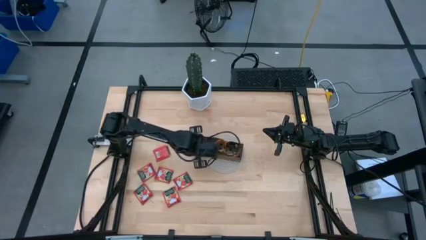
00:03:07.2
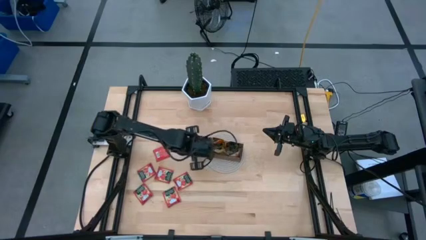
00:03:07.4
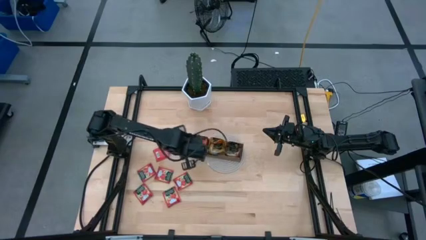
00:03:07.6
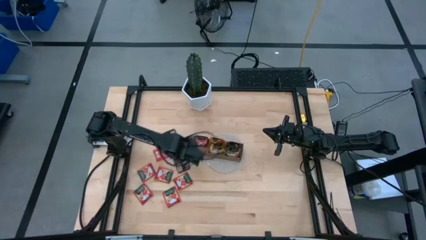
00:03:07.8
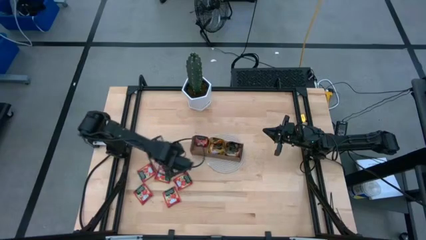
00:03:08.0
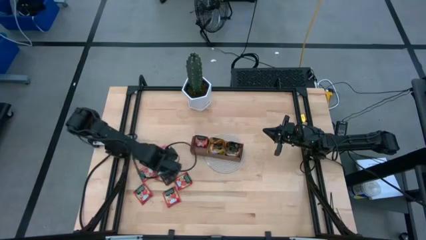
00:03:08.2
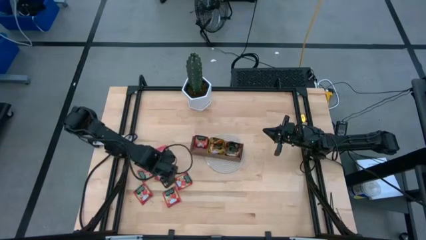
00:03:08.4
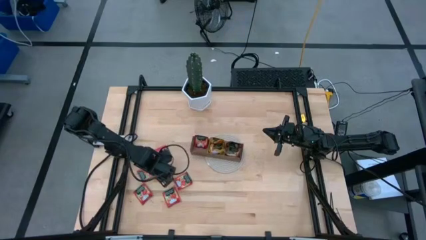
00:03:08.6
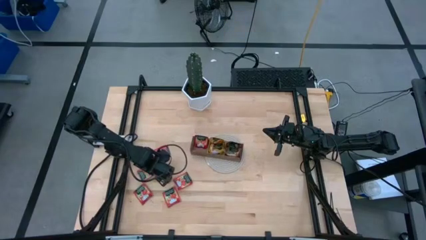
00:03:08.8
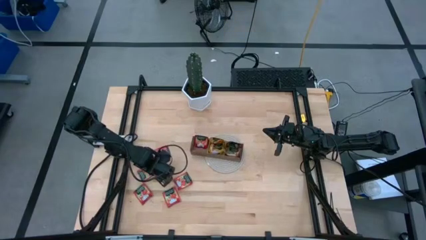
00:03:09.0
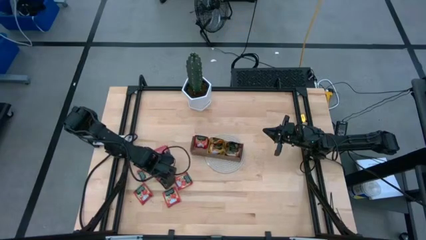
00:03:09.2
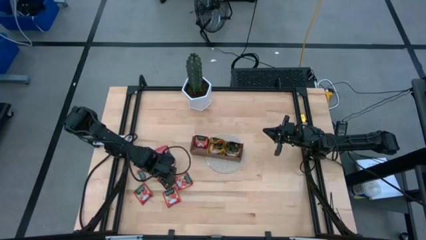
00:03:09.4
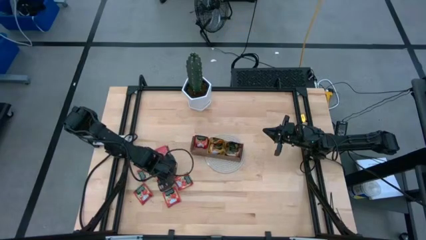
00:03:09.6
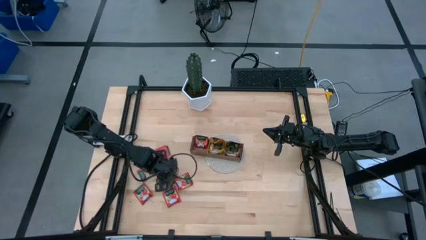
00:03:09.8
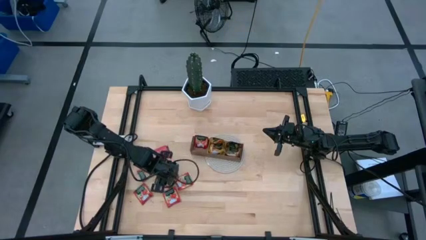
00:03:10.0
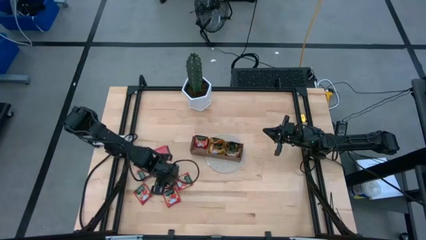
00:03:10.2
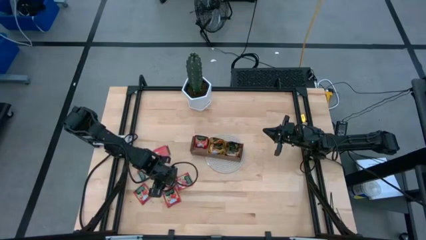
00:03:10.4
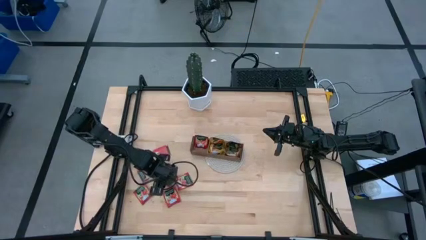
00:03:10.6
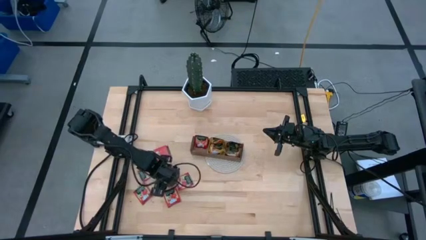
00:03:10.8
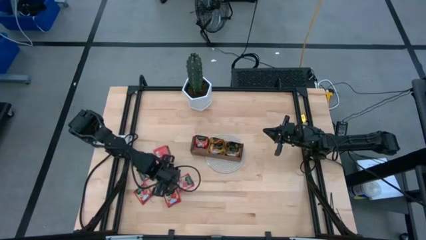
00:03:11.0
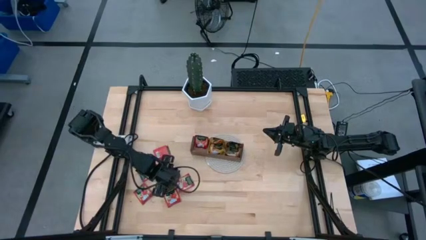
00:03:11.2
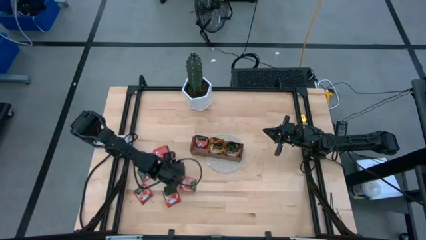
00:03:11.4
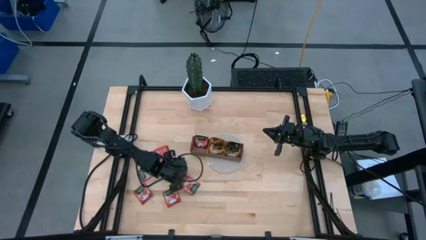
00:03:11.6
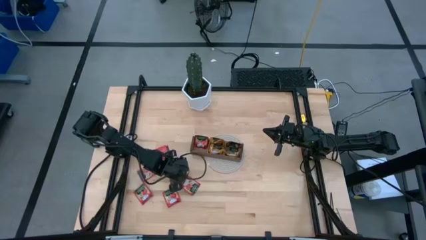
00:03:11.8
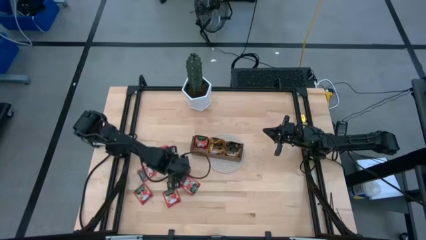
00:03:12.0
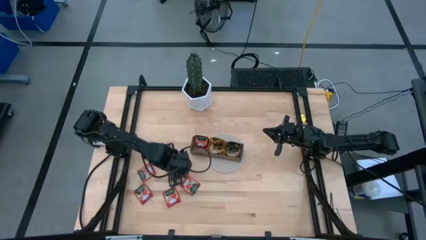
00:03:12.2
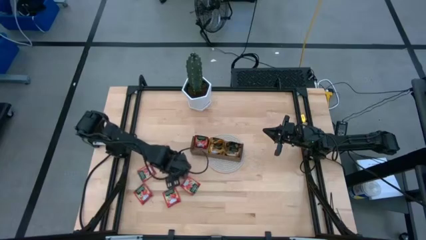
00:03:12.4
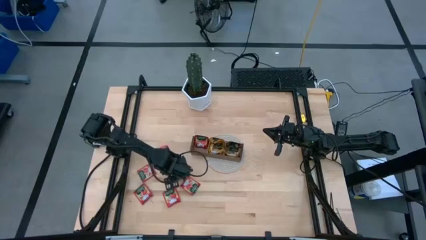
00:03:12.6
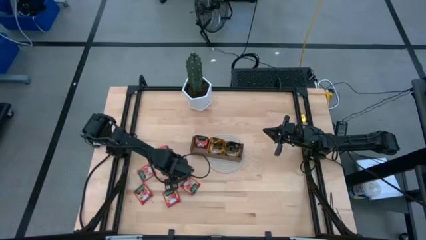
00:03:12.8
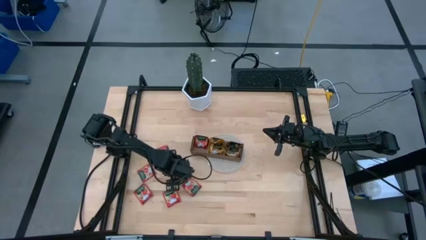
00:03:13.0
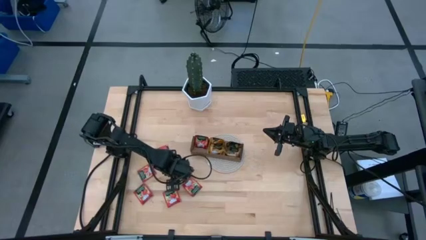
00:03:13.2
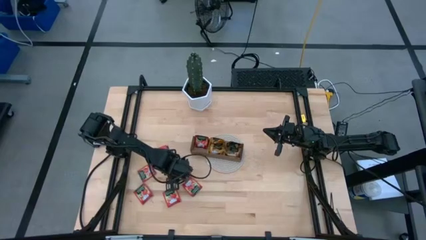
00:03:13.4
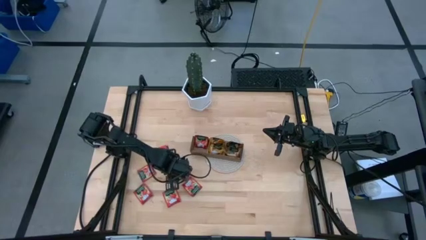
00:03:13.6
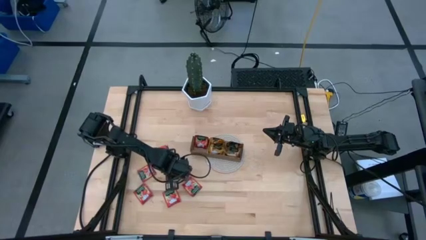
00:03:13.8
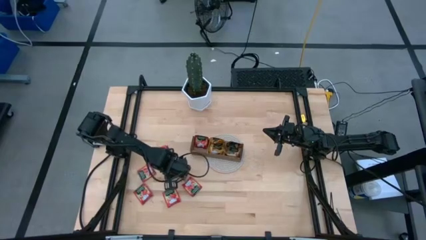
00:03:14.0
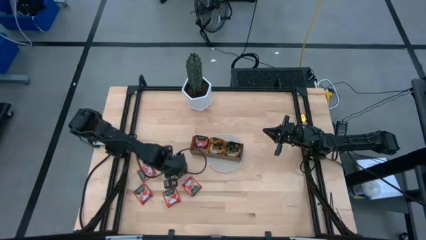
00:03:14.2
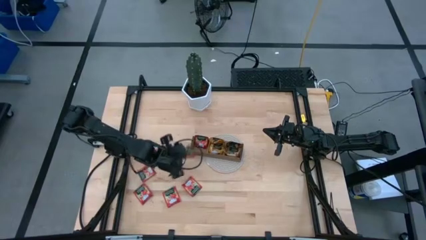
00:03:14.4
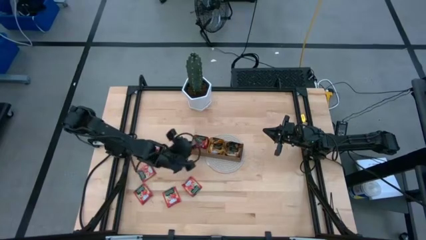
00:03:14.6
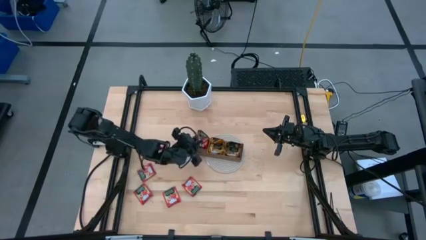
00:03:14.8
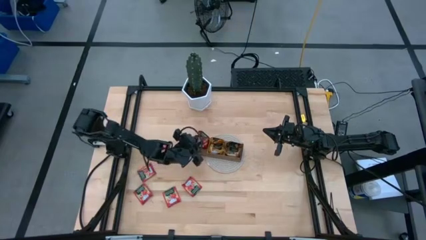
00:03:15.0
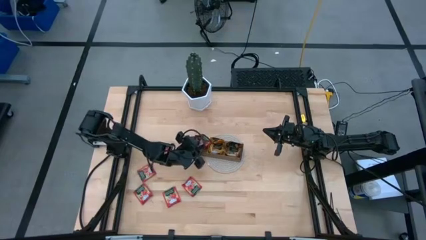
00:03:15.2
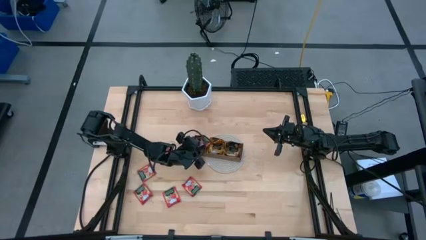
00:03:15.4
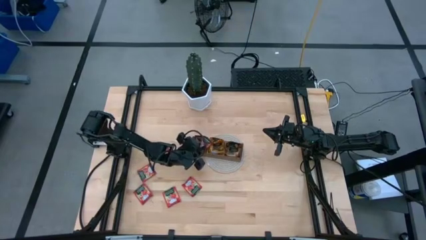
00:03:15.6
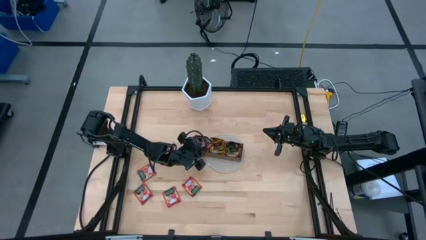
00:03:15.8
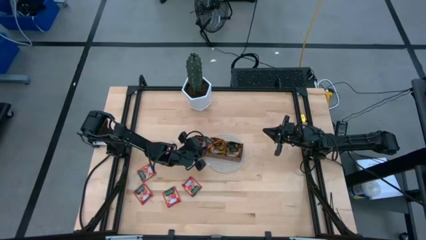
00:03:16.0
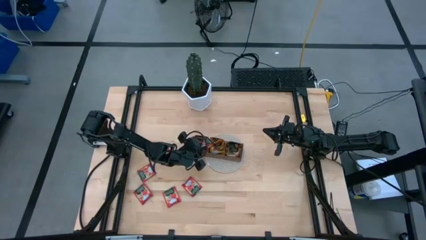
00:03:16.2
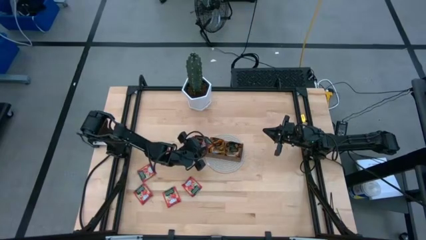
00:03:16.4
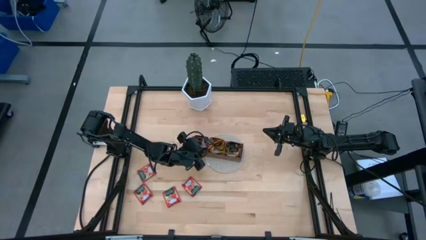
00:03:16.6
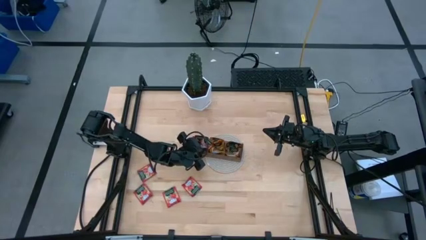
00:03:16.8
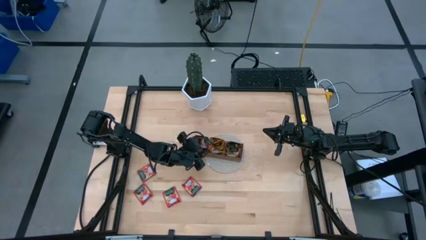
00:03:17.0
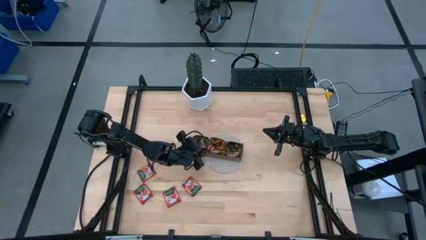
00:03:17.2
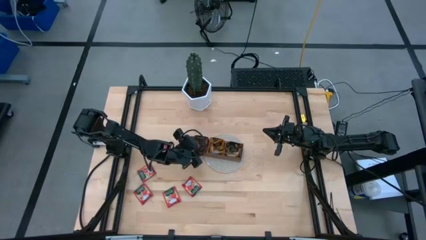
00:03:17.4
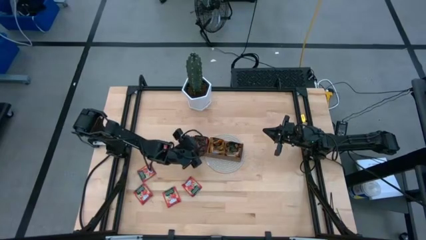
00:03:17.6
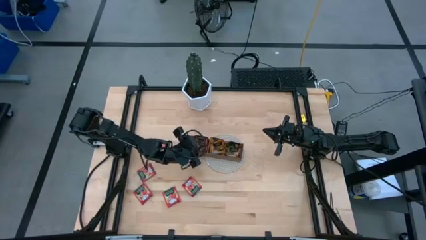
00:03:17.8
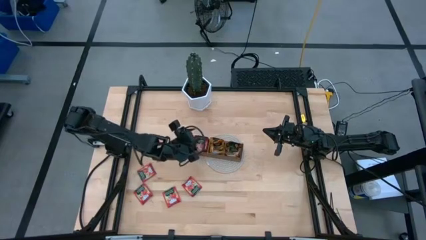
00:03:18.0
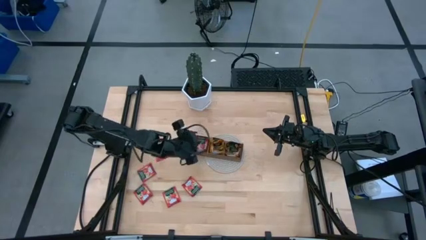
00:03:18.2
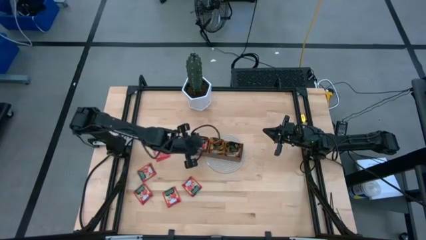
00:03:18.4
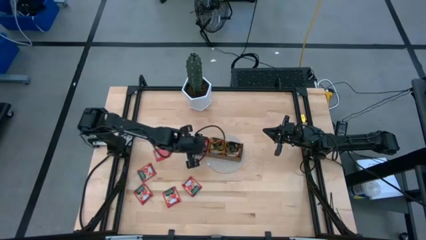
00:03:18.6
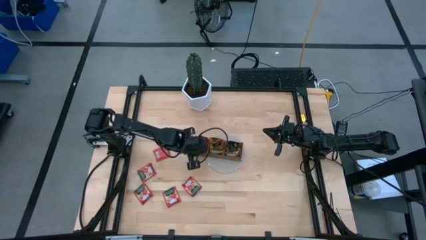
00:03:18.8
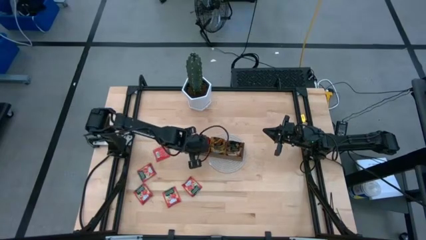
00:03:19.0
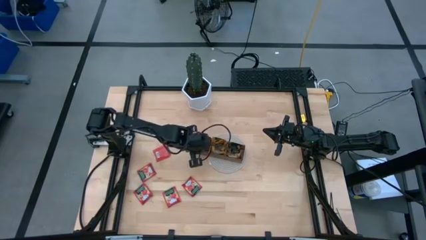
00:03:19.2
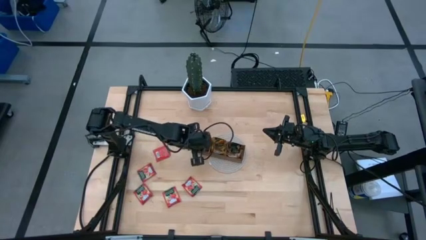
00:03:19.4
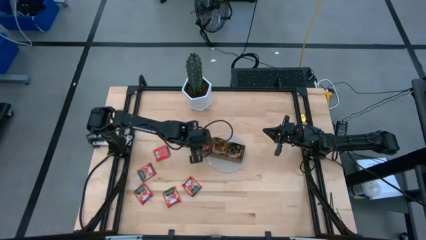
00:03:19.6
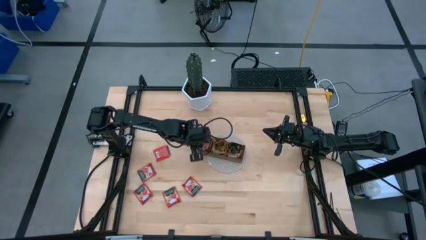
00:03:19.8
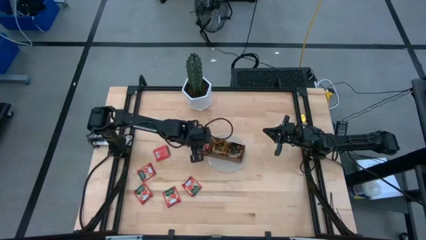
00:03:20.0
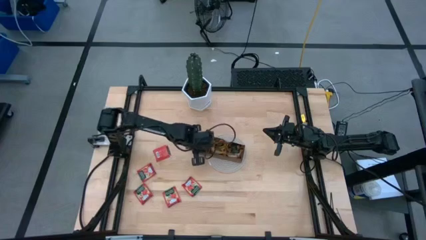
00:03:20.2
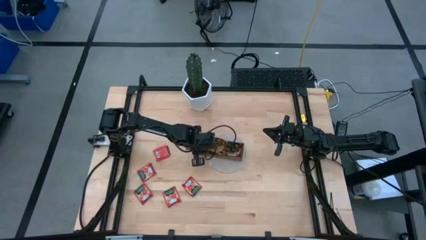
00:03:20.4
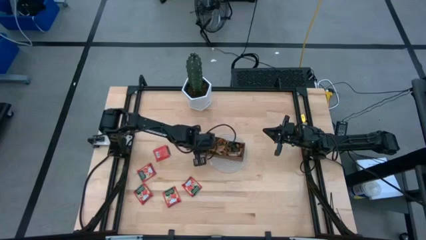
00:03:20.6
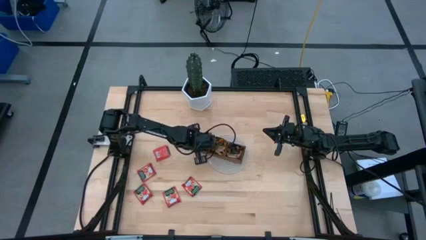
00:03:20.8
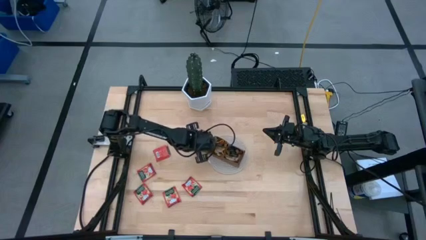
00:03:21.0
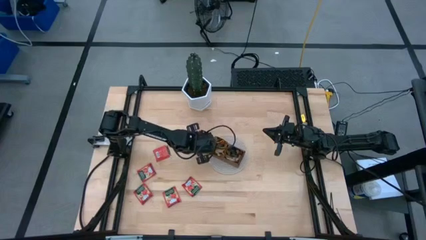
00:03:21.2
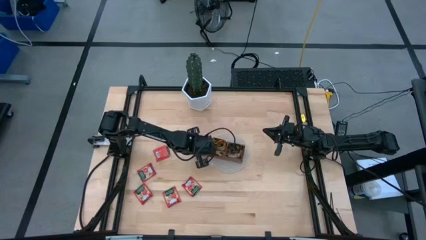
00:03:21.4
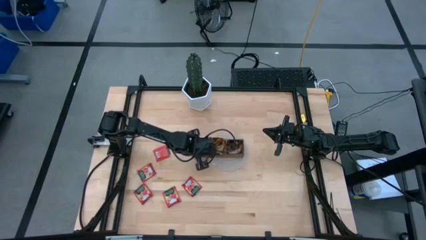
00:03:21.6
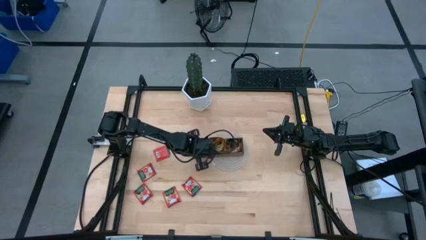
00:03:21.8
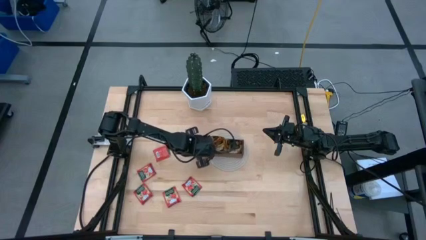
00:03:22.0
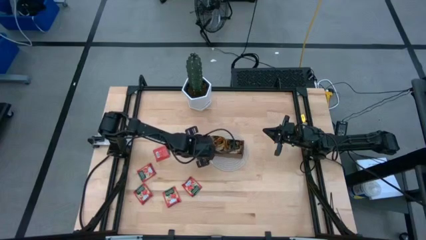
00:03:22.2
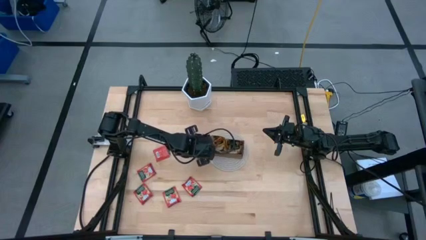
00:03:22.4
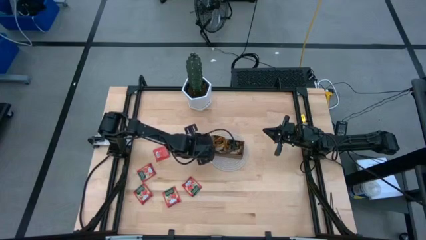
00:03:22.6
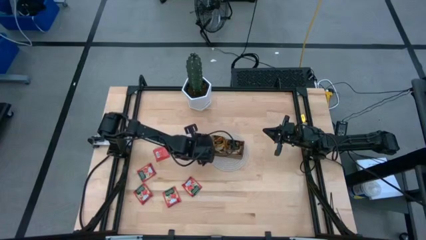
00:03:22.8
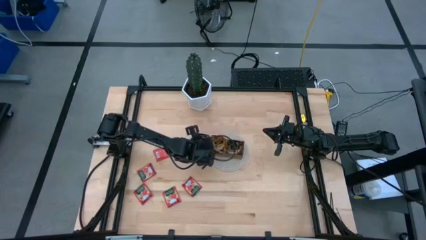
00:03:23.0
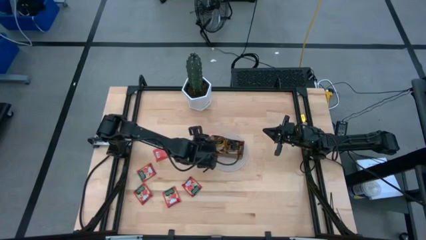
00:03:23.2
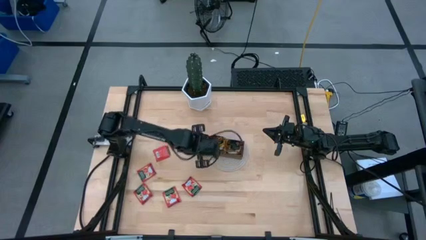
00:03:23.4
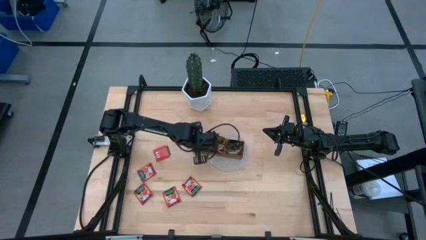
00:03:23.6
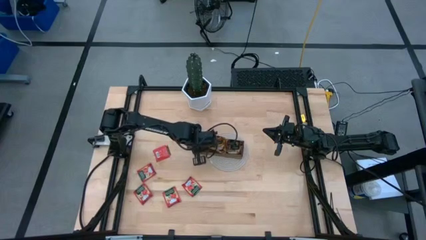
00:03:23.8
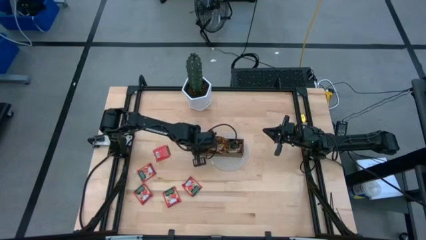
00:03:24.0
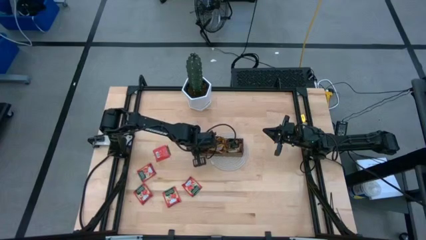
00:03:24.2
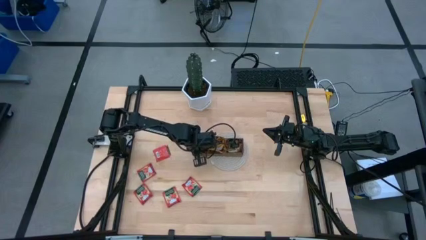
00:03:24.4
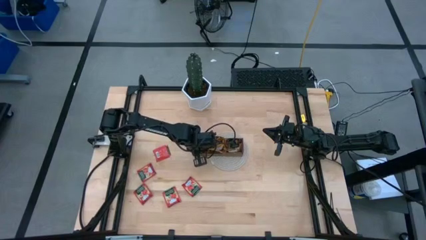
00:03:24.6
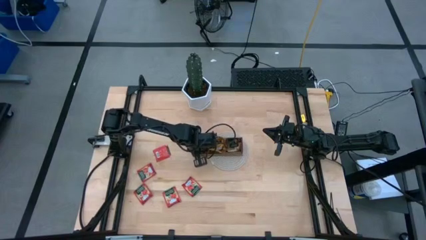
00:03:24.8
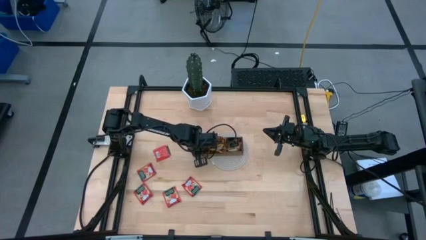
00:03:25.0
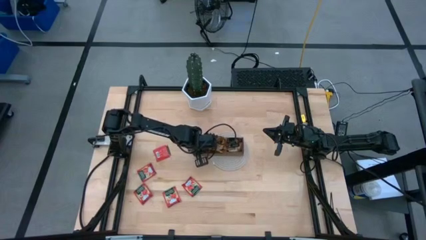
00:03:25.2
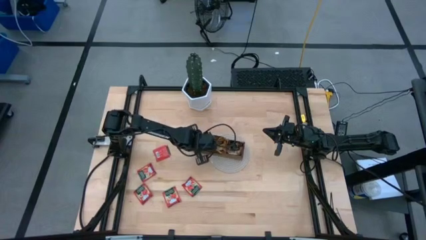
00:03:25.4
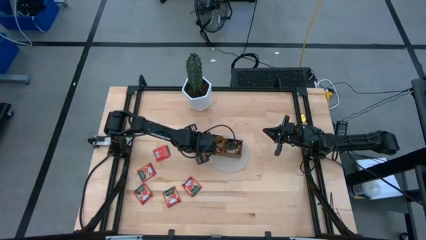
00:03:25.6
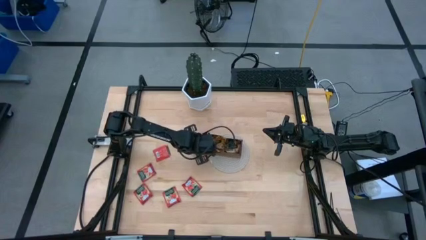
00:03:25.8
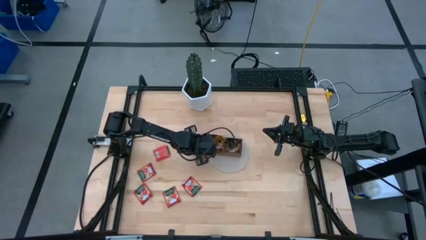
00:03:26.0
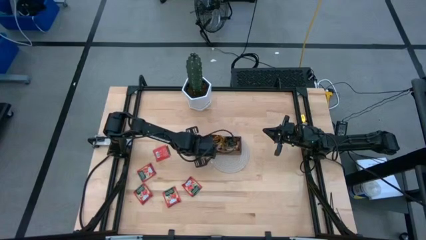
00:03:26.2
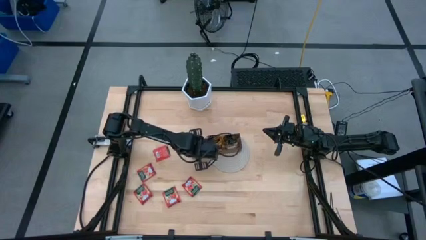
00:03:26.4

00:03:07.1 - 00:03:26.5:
Task: Pick & Place Tea
Put the red tea bag into the left section of the wooden organizer
